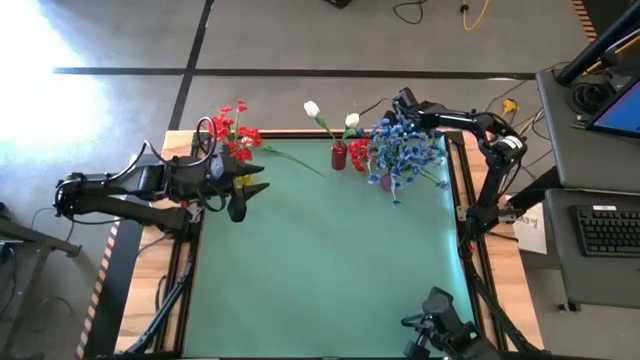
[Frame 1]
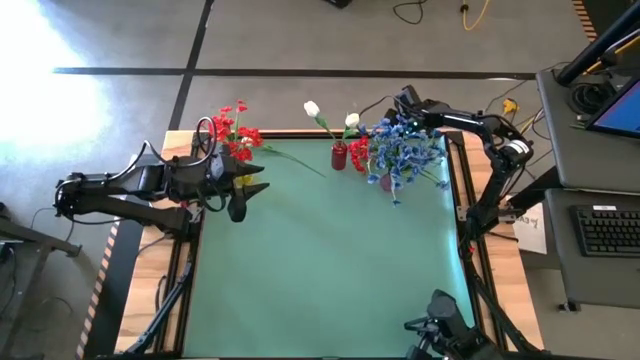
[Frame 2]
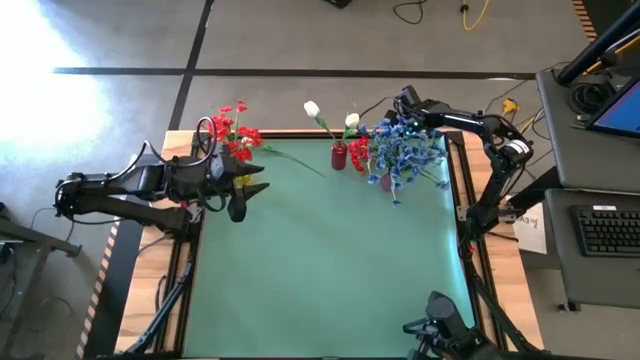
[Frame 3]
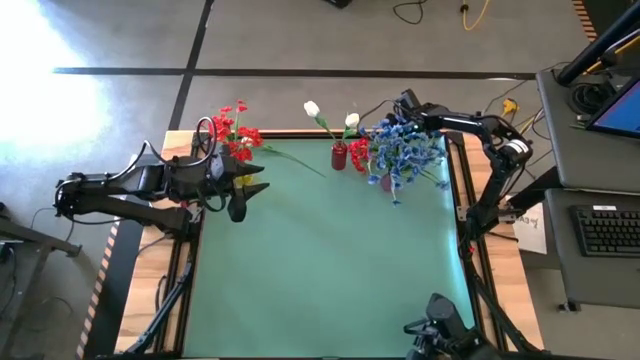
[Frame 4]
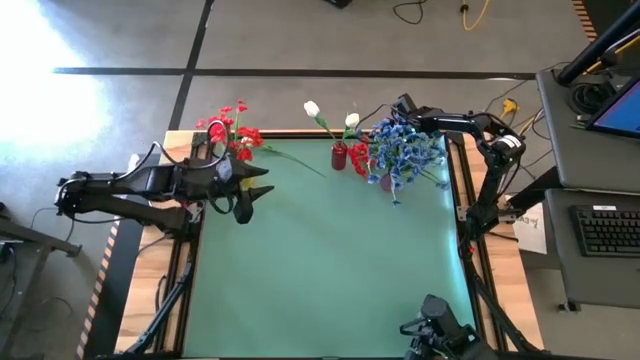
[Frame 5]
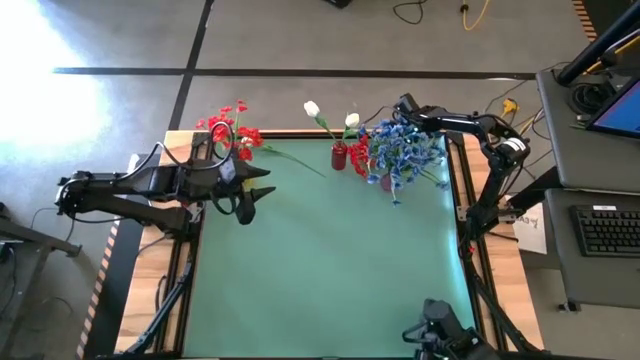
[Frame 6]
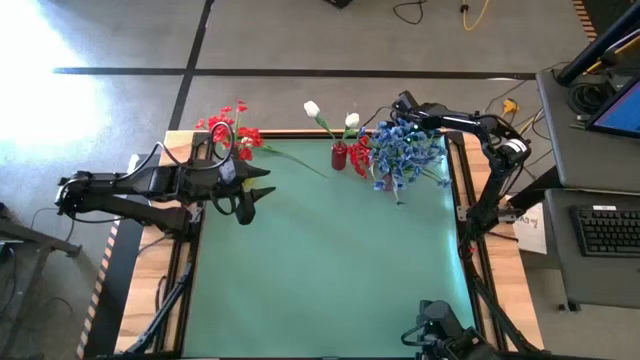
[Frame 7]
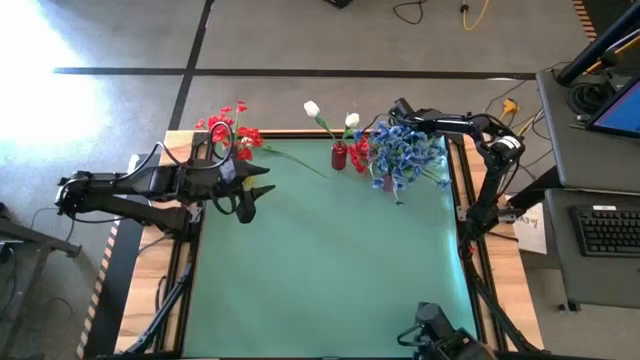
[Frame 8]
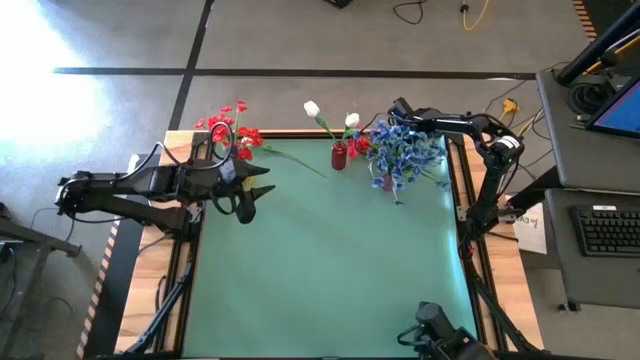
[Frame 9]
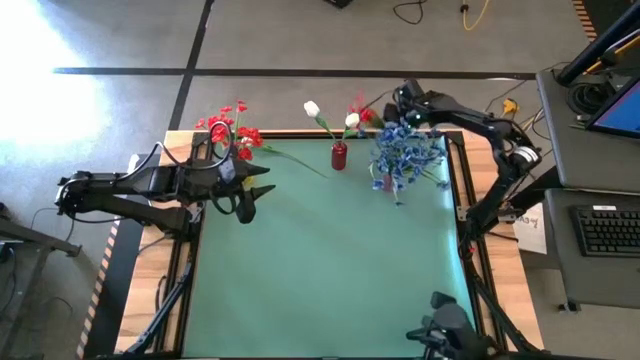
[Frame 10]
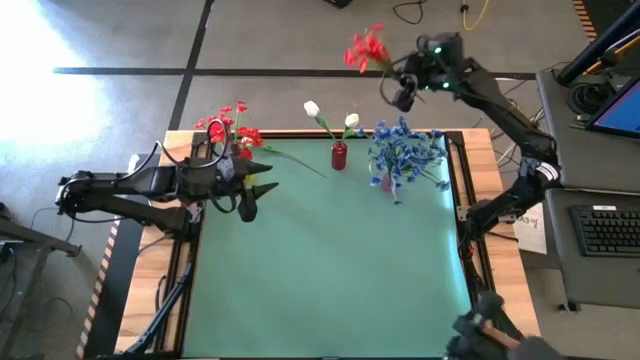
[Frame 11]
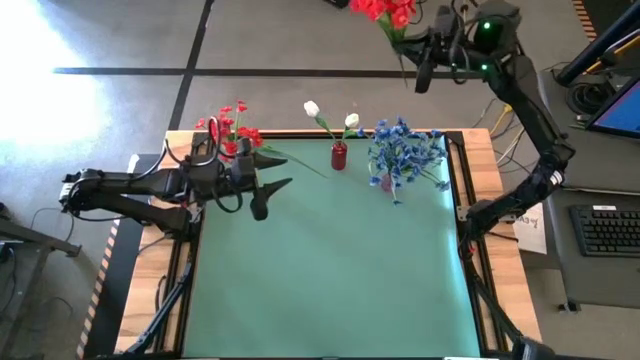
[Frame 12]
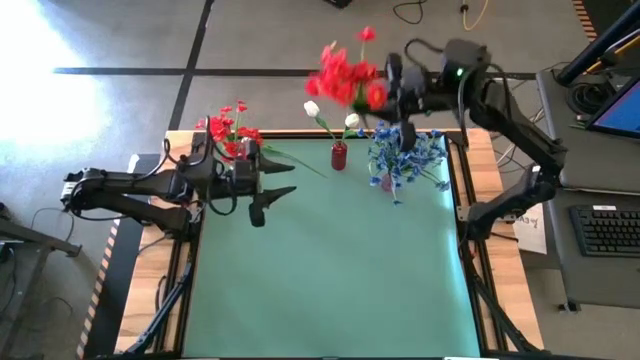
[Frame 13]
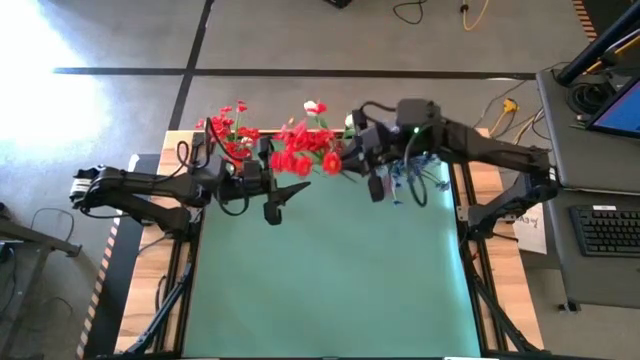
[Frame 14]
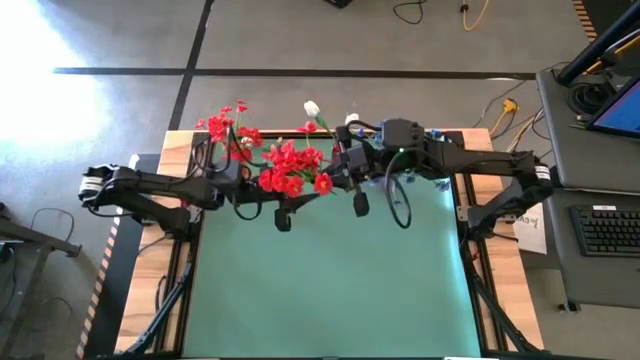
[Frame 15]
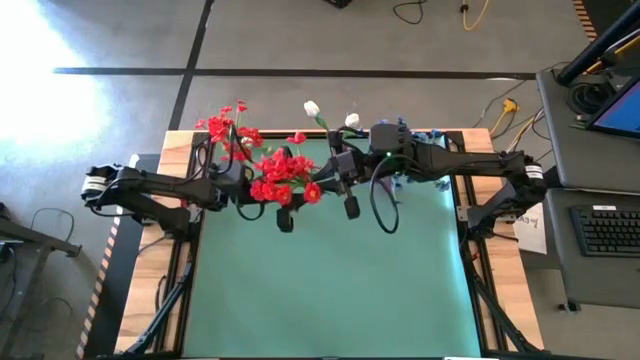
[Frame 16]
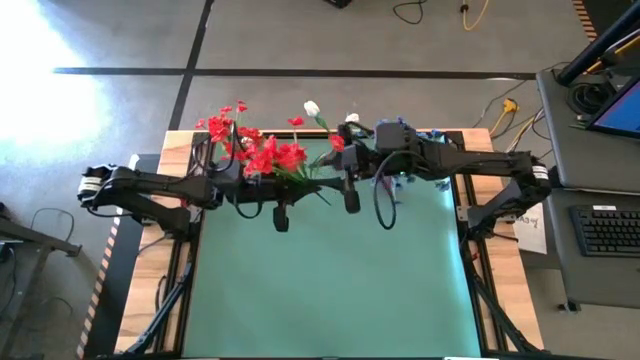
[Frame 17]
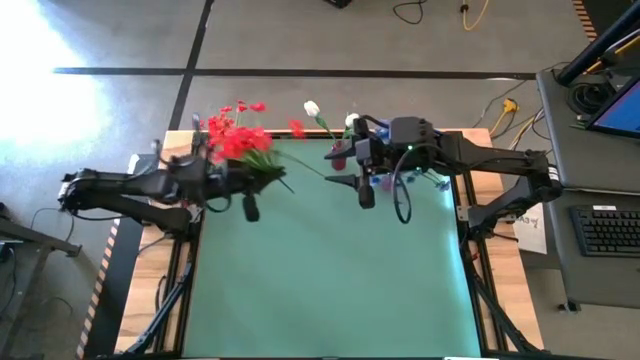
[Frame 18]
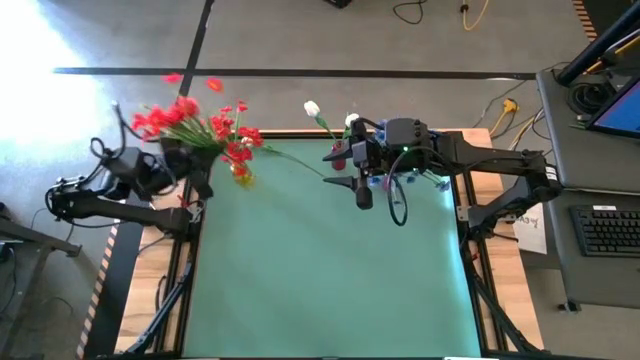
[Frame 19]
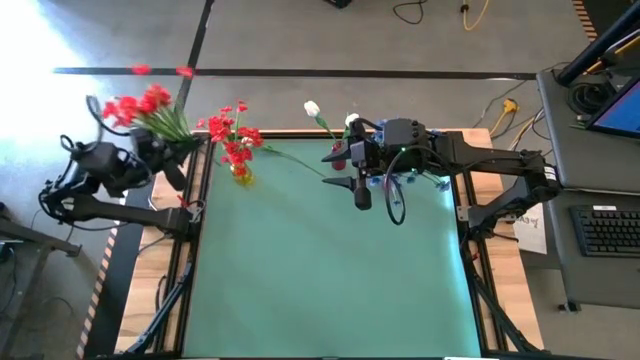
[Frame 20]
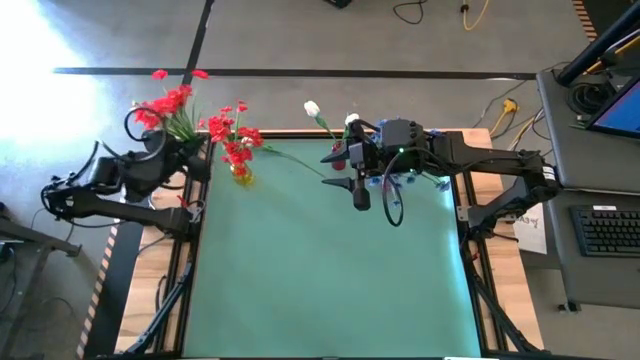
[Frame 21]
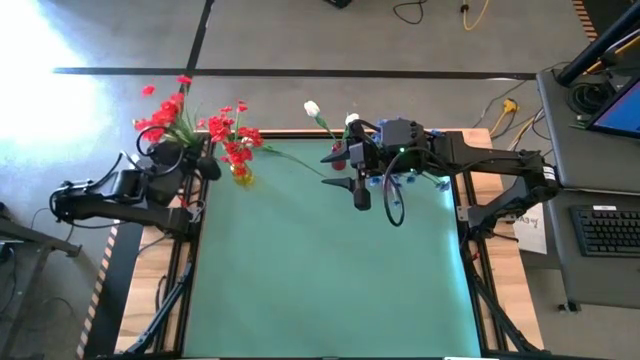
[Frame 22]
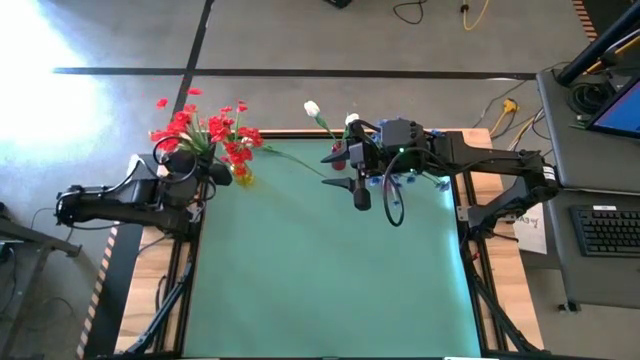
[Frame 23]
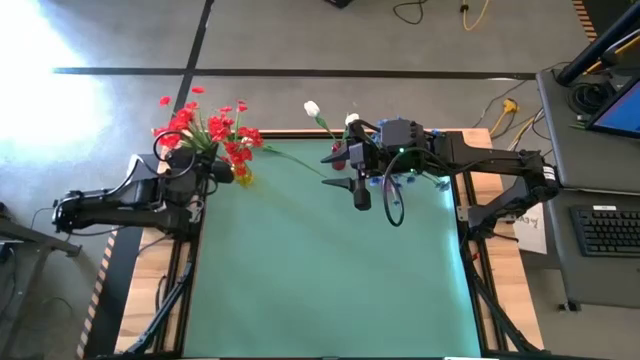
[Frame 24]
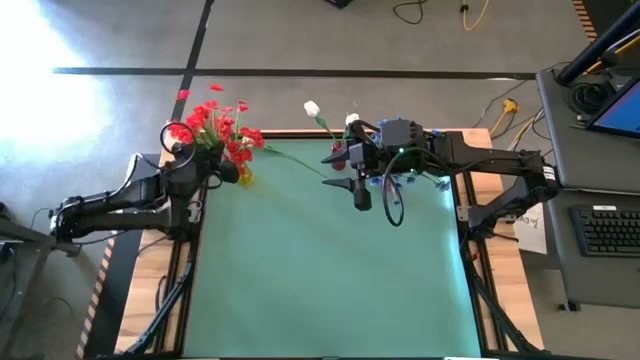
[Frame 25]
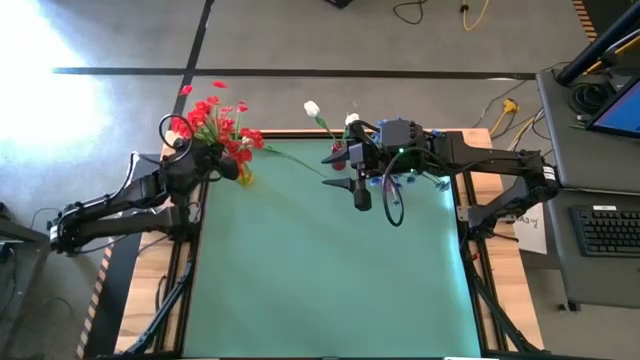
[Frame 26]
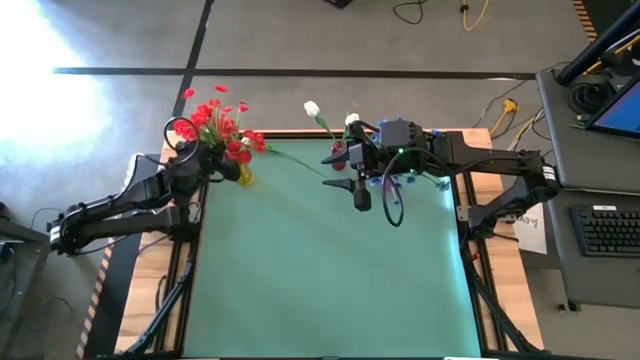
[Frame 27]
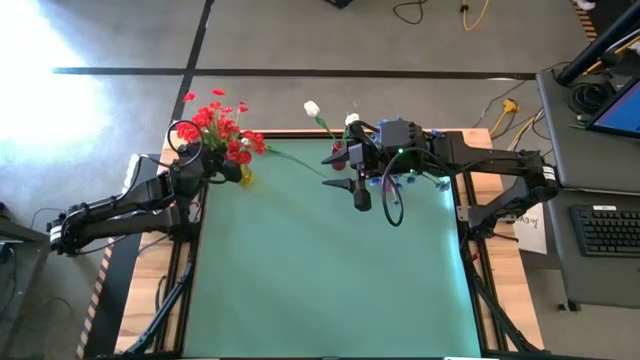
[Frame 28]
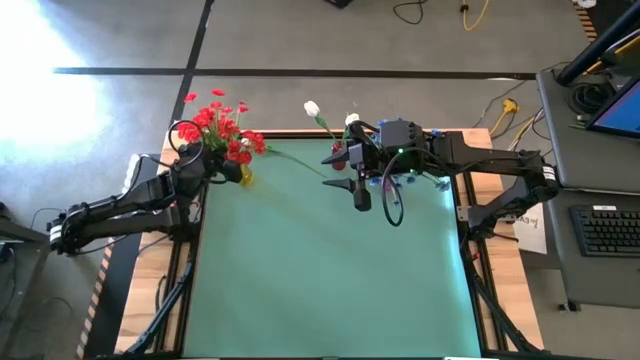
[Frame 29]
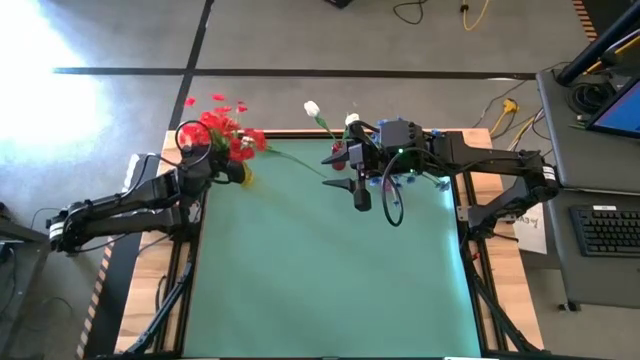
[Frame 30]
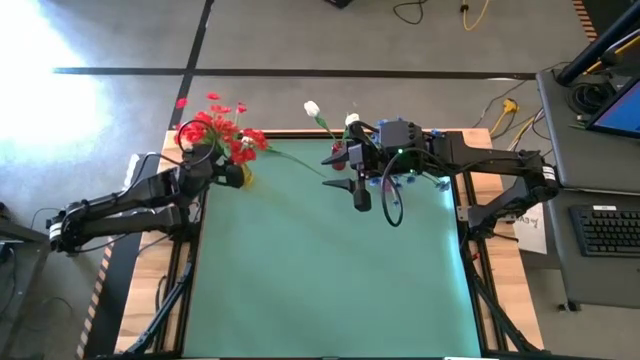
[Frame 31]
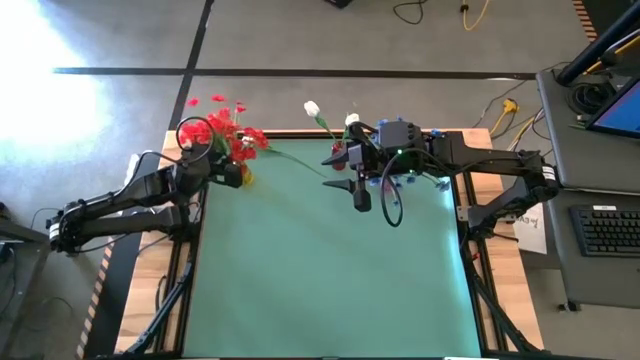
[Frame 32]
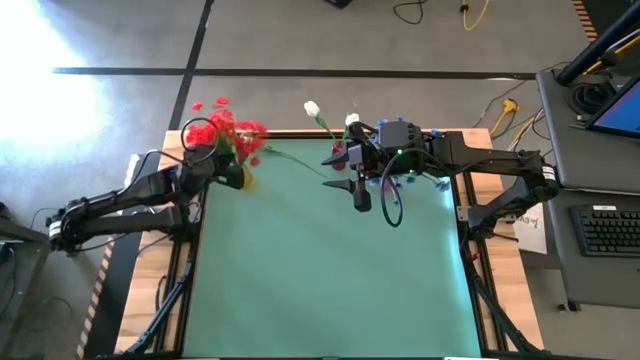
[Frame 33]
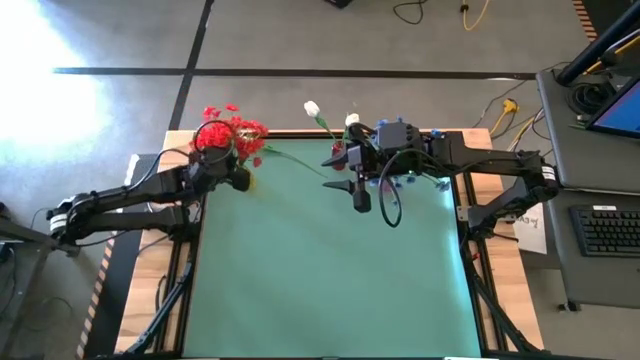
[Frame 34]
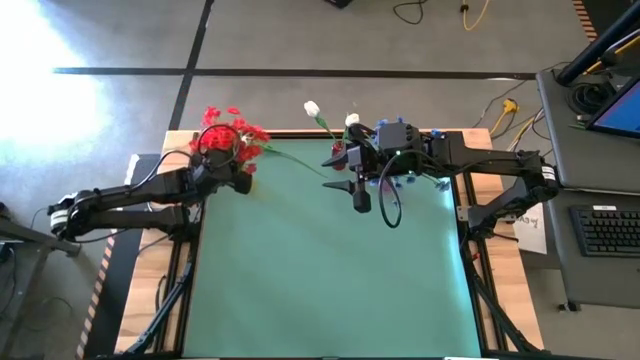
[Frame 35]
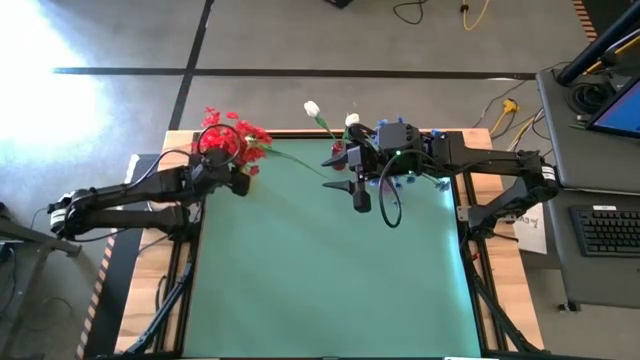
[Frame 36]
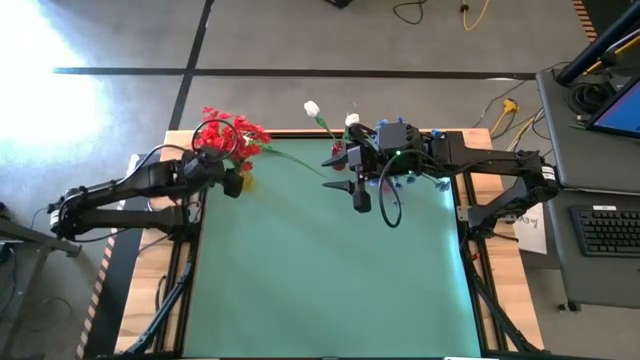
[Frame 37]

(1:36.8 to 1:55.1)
Task: Sort flowers into vase by color
Put the red flower into the yellow vase
